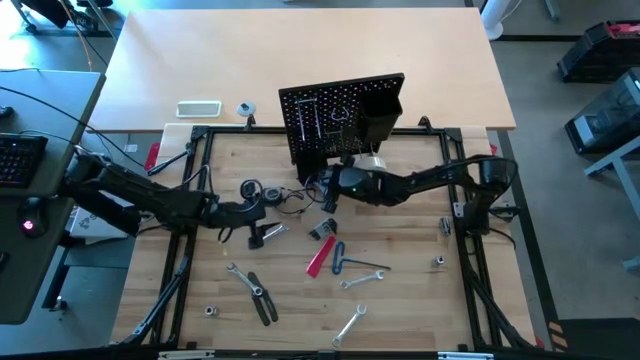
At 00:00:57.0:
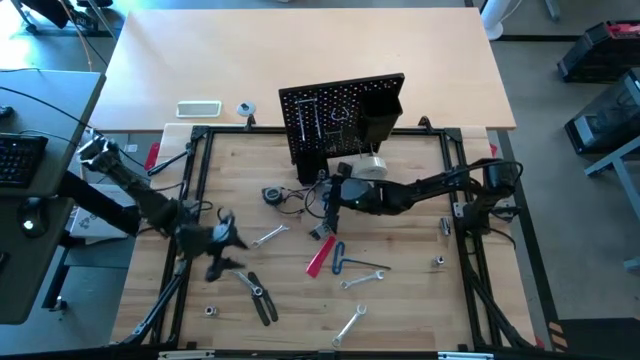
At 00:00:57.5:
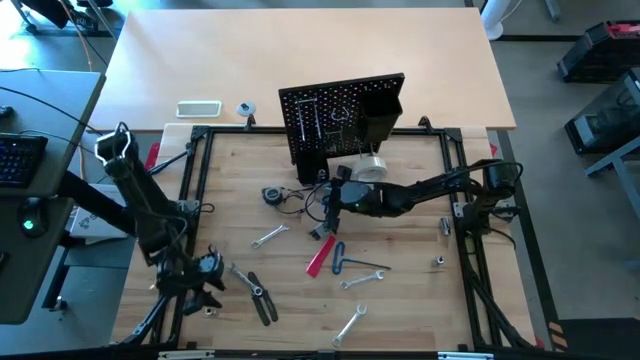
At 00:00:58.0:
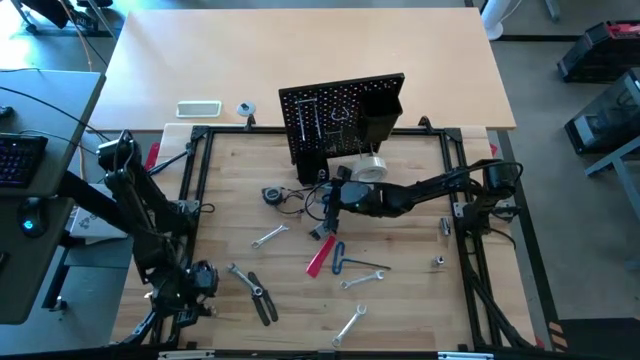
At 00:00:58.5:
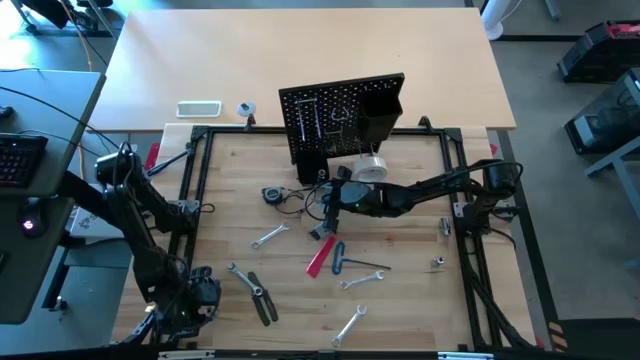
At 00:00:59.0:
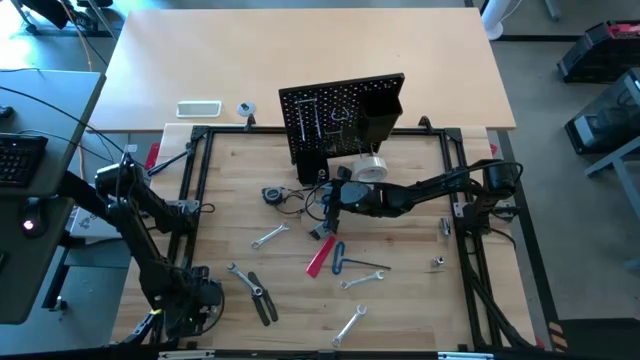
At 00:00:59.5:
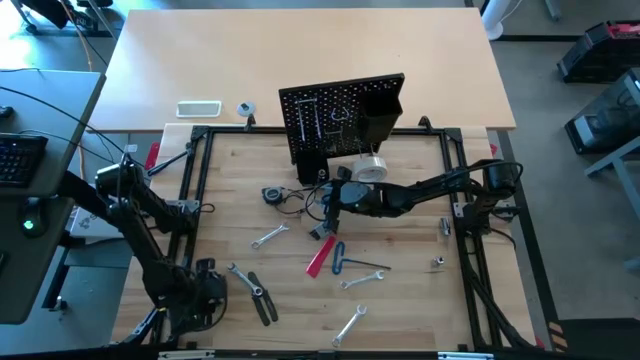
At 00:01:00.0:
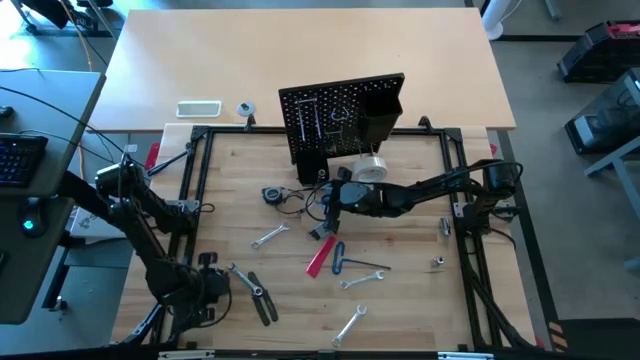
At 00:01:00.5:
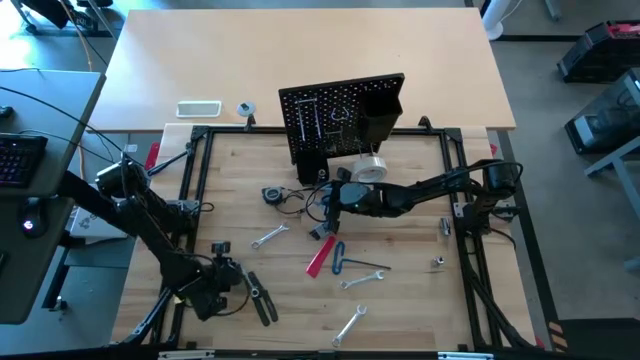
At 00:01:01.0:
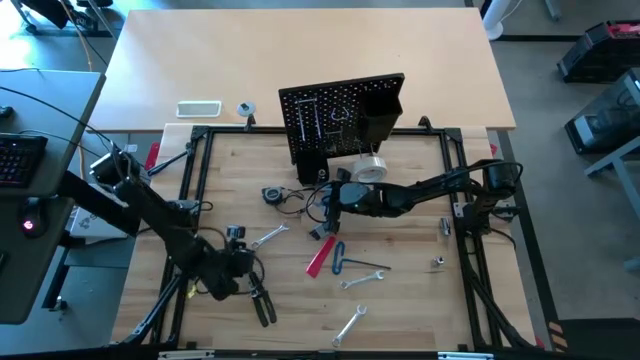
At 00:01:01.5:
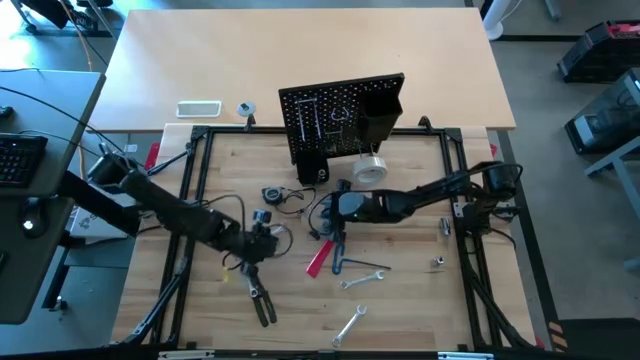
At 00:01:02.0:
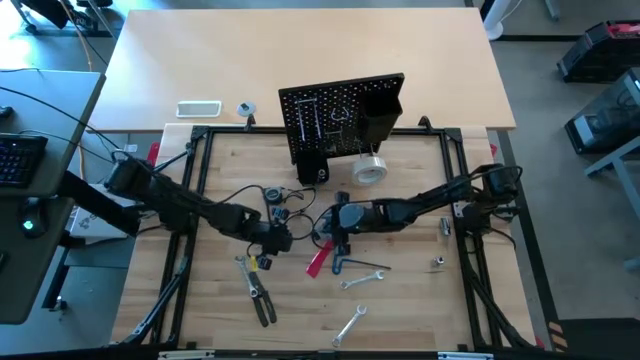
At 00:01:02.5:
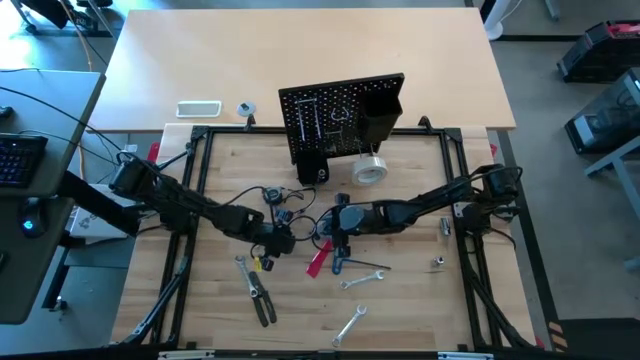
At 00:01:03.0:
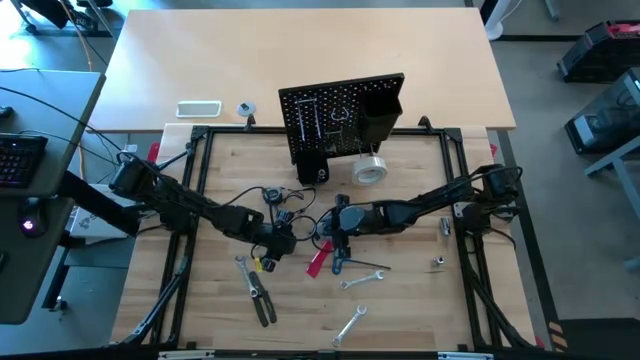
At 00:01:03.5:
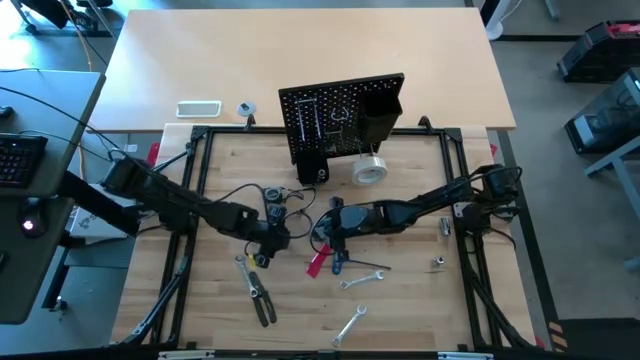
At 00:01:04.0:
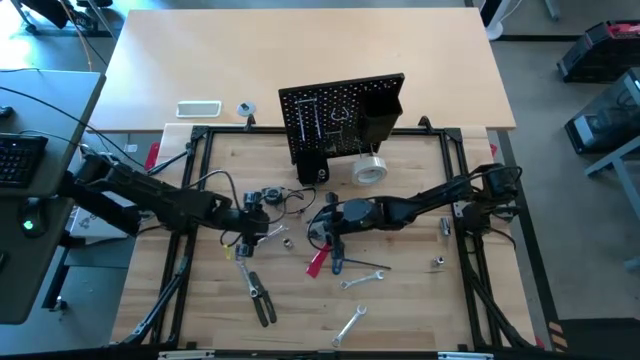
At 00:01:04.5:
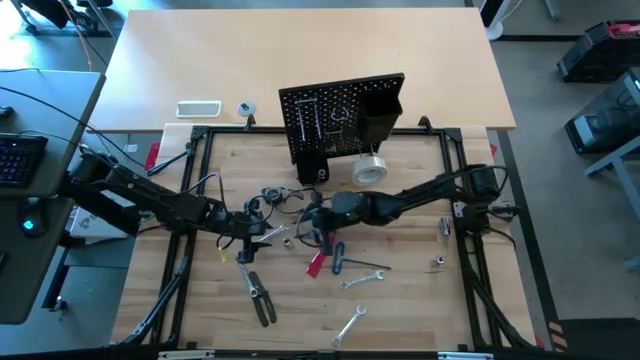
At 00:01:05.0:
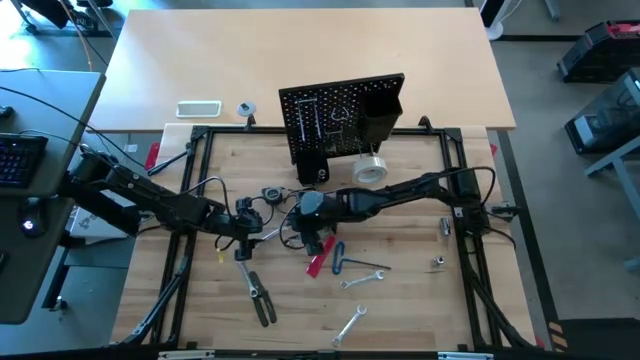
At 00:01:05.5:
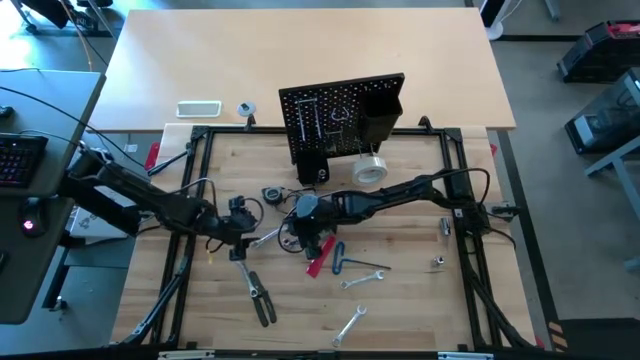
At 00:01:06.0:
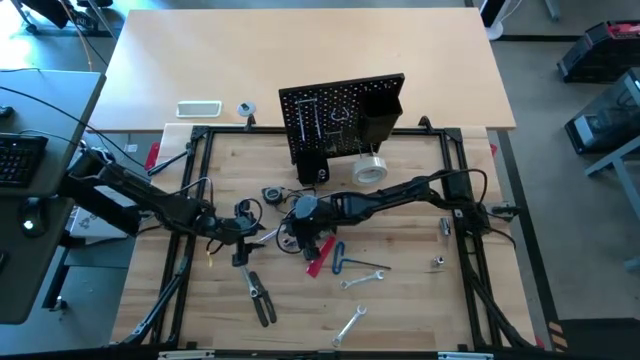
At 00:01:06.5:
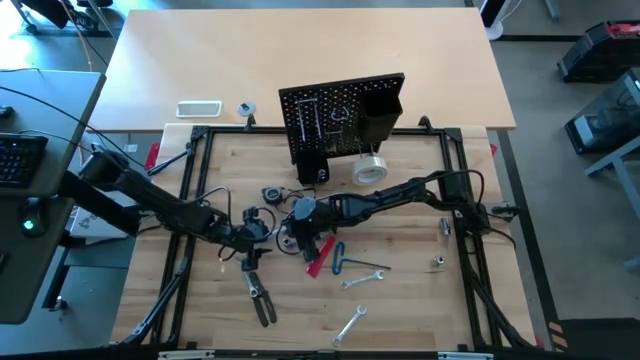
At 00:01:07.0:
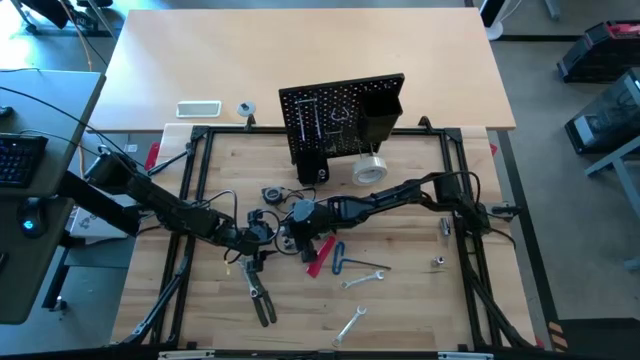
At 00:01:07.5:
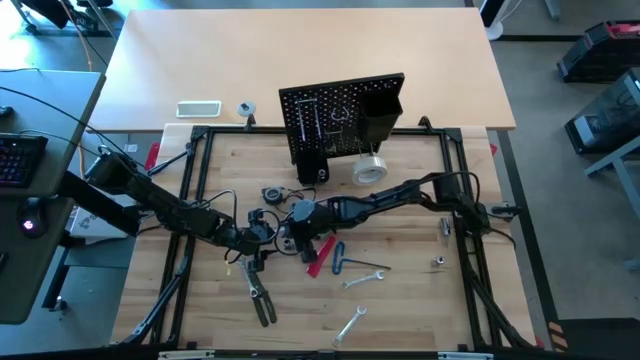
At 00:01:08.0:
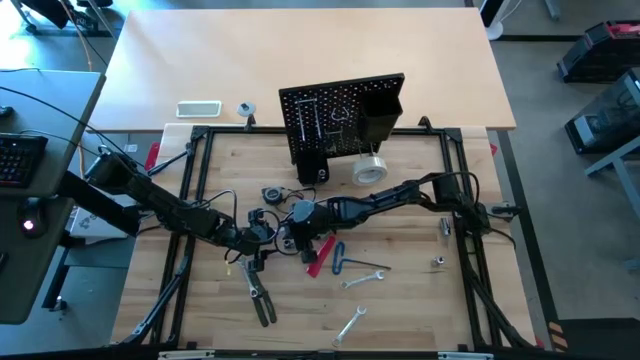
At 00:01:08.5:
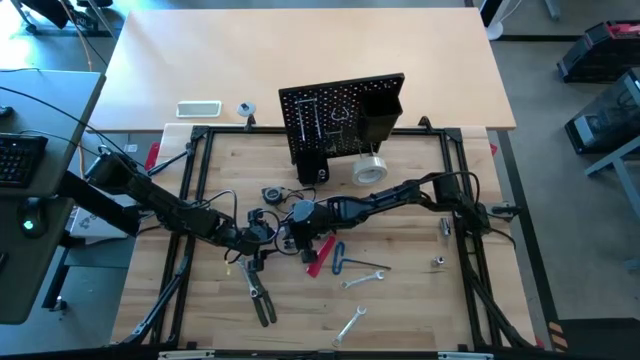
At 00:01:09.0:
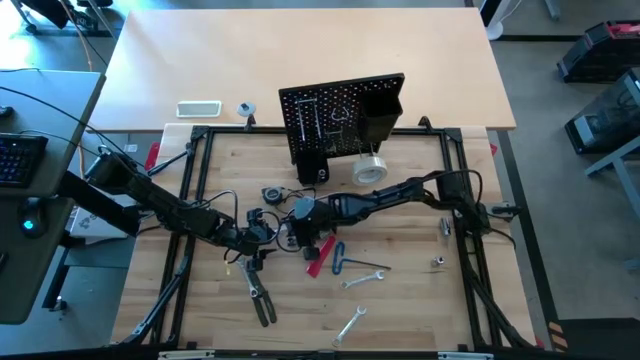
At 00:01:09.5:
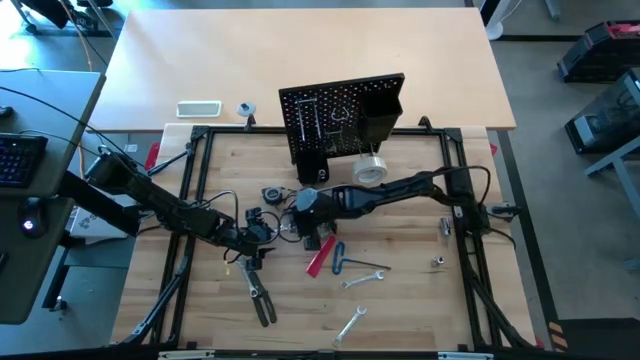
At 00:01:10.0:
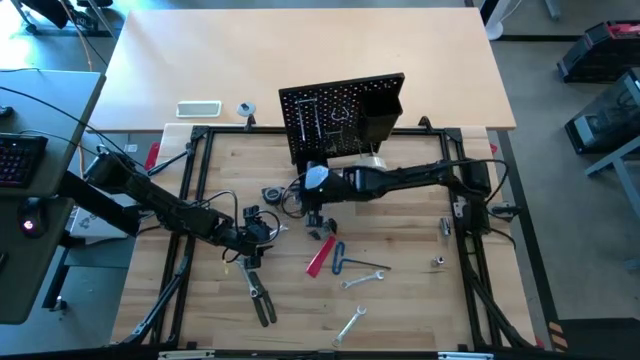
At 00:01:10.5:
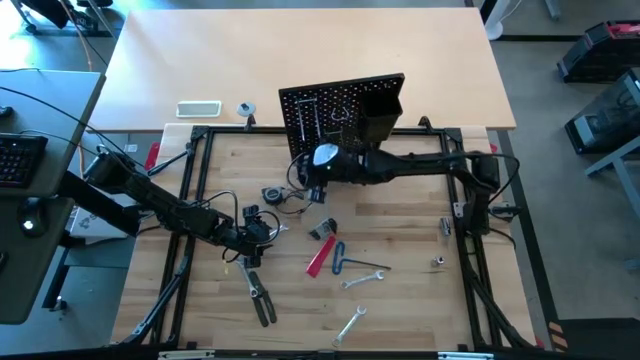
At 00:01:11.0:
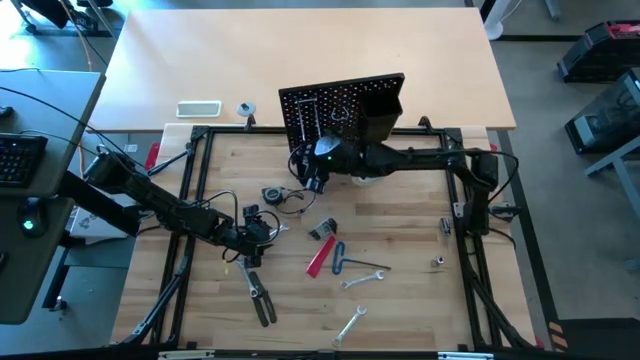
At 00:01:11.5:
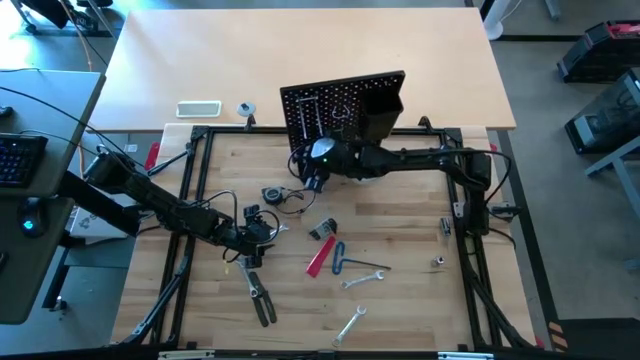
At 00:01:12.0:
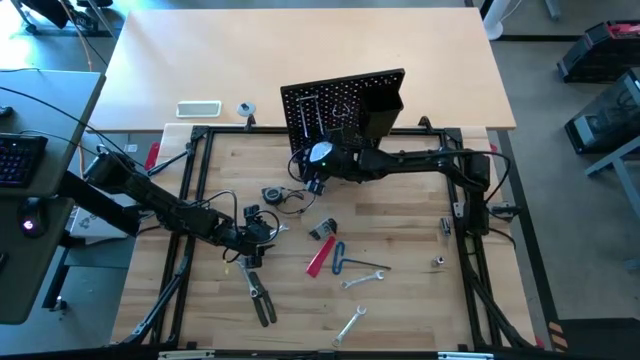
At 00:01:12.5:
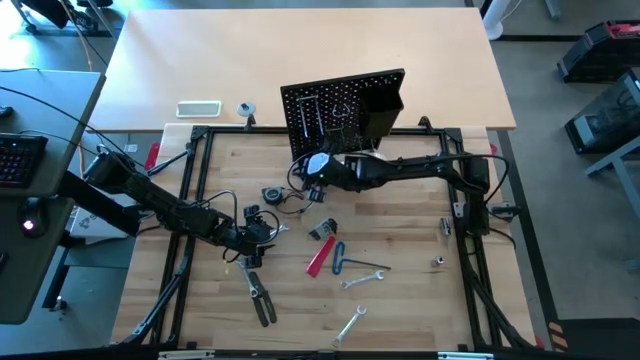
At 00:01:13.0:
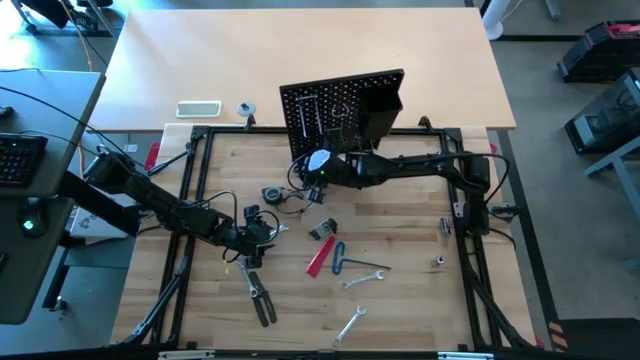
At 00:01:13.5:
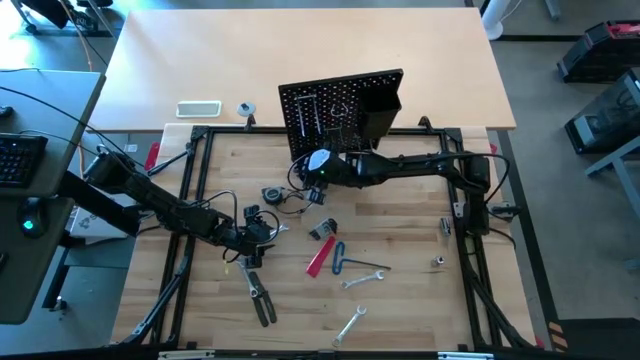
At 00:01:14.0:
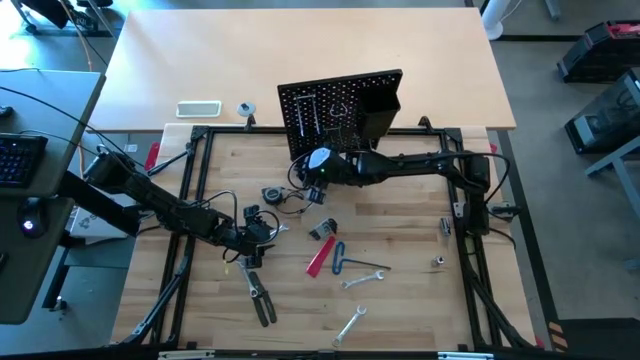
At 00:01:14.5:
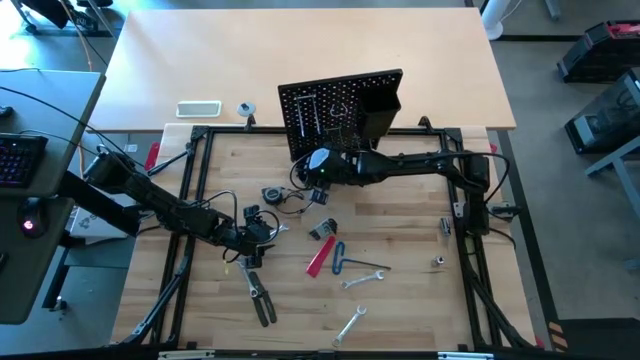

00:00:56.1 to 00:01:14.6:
Task: Hang tools onto peg board
Put the bottom left socket into the bottom black bin on the peg board

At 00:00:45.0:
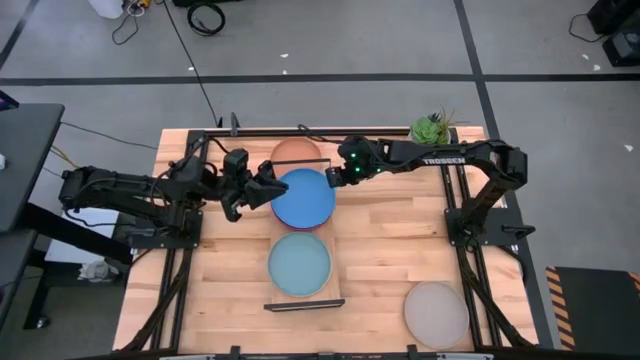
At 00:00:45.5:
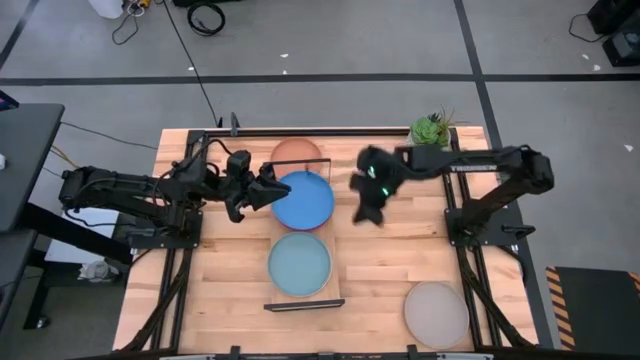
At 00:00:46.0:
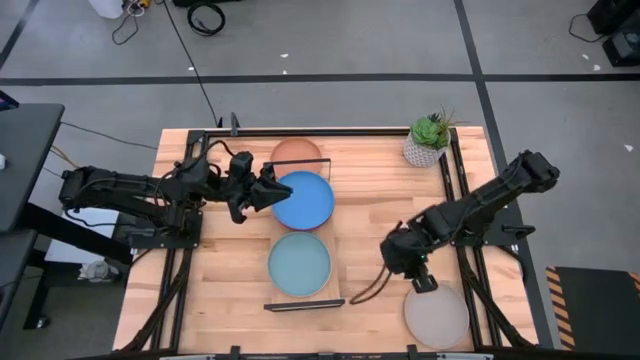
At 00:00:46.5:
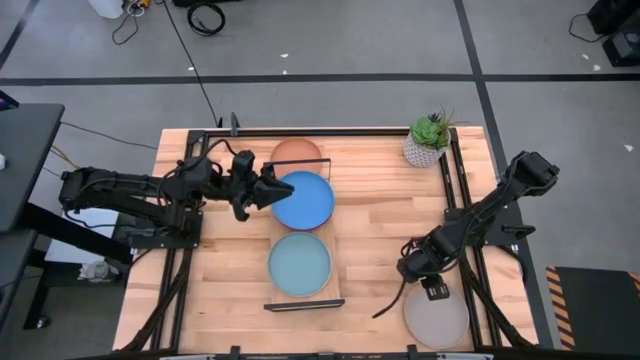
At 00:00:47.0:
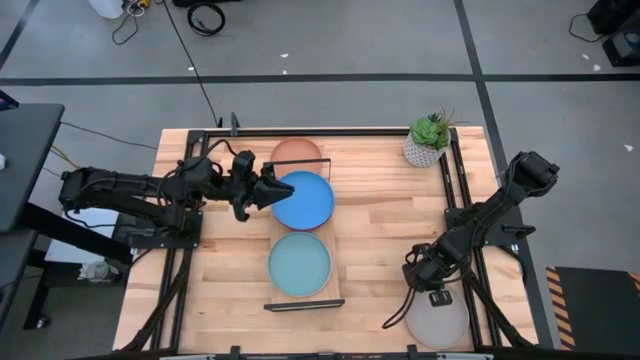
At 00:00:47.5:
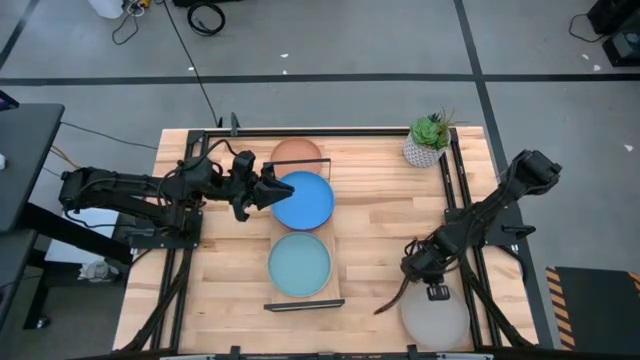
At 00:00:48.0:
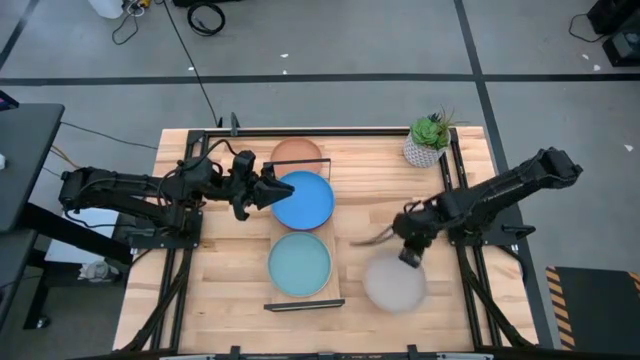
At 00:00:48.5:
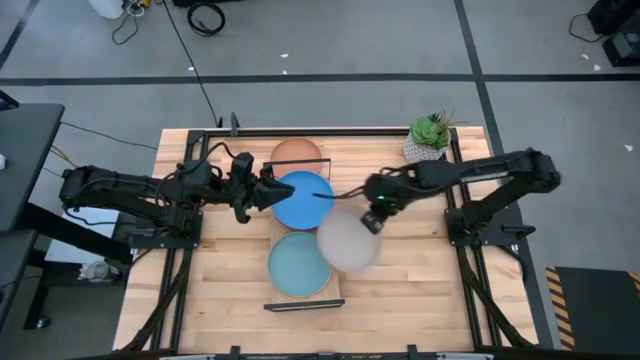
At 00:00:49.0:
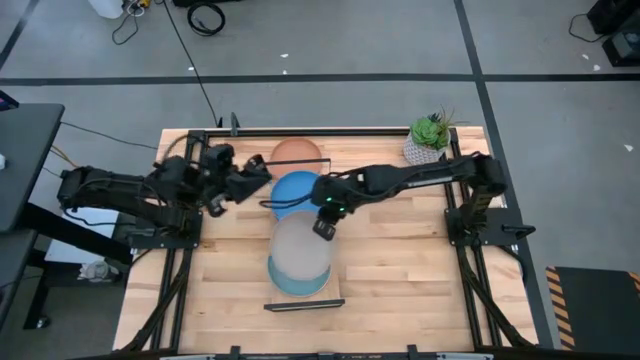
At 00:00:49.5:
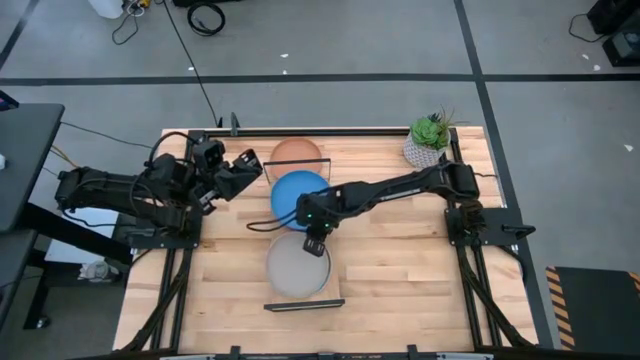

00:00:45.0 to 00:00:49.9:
Task: Place and stack plates onto a shelf
Stack the gray plate on top of the light blue plate on the shelf
